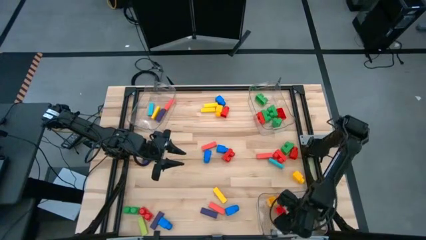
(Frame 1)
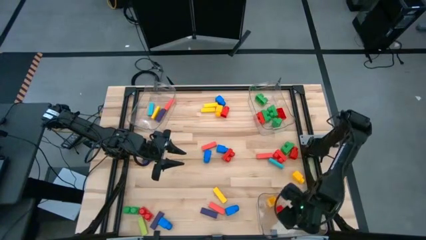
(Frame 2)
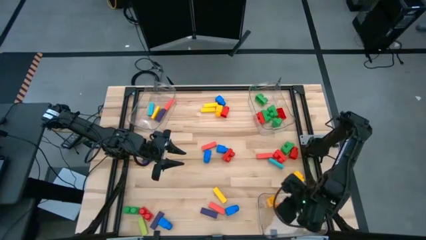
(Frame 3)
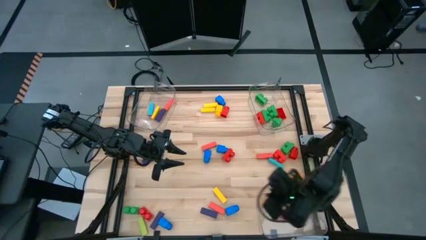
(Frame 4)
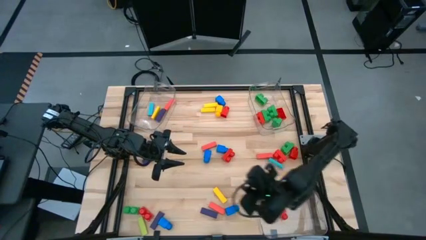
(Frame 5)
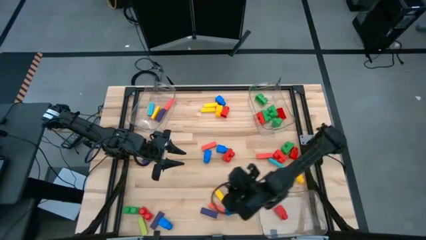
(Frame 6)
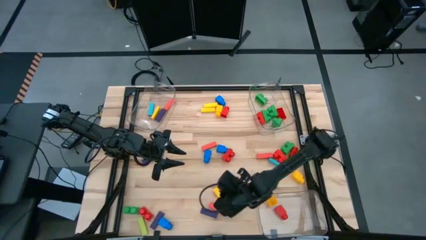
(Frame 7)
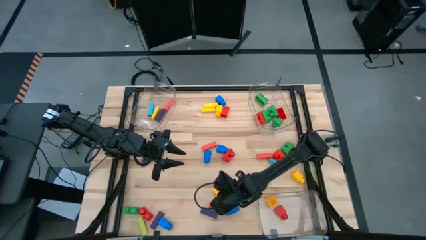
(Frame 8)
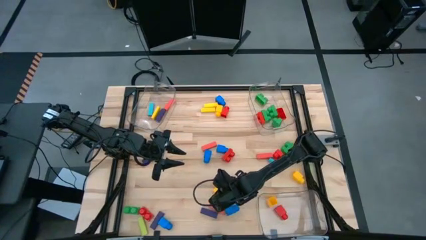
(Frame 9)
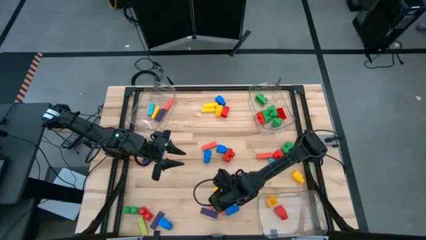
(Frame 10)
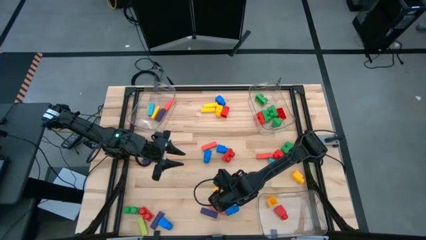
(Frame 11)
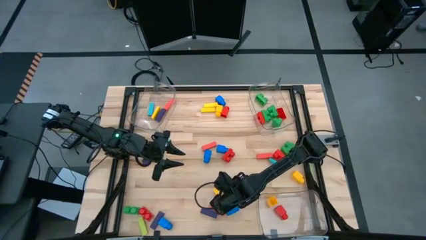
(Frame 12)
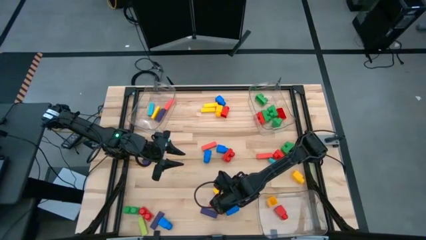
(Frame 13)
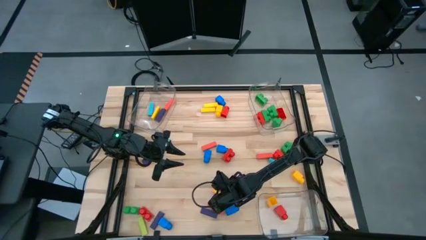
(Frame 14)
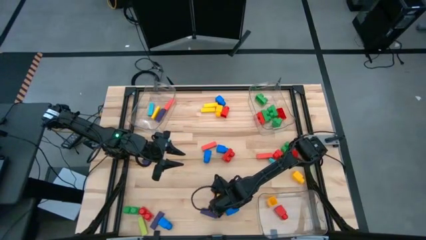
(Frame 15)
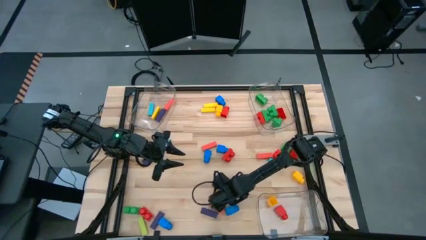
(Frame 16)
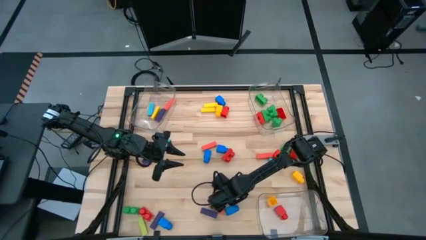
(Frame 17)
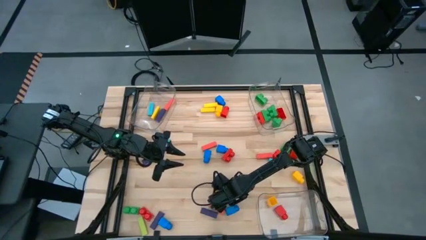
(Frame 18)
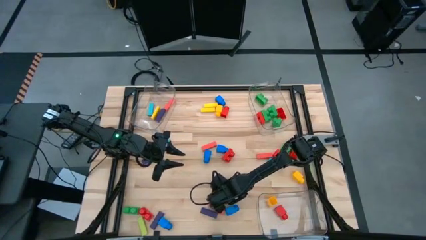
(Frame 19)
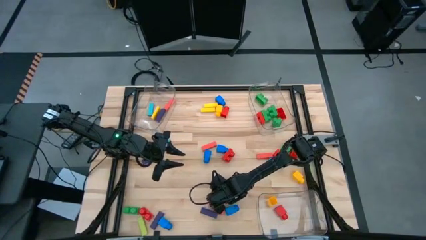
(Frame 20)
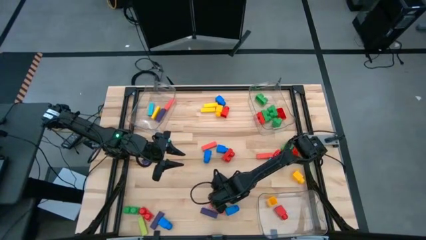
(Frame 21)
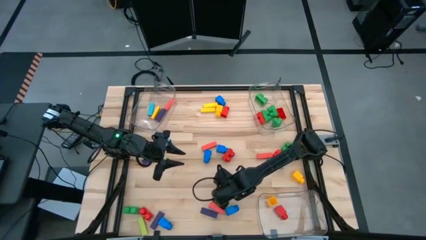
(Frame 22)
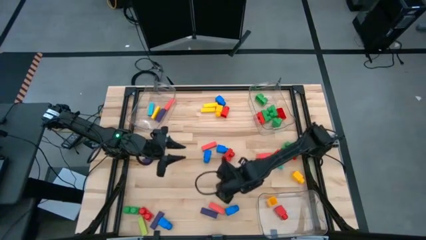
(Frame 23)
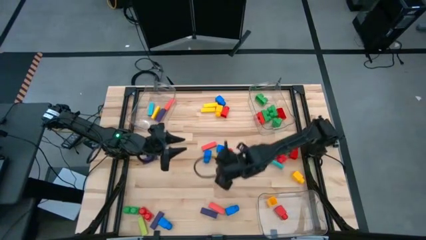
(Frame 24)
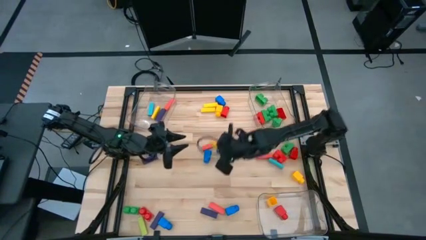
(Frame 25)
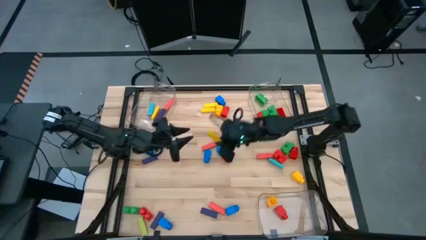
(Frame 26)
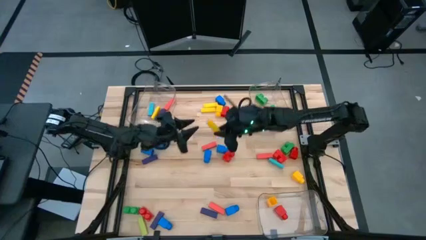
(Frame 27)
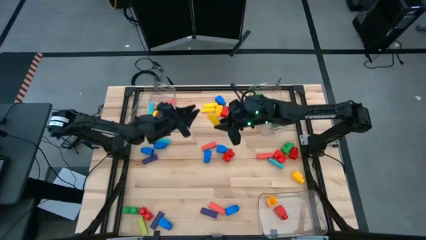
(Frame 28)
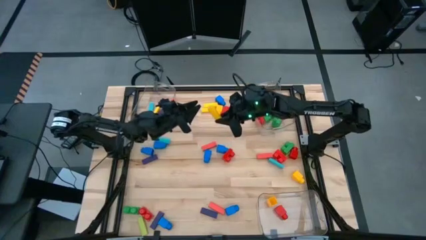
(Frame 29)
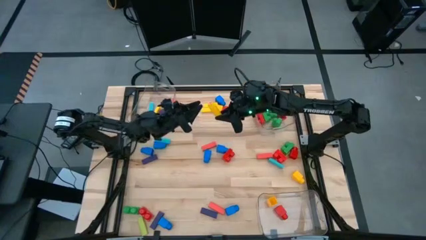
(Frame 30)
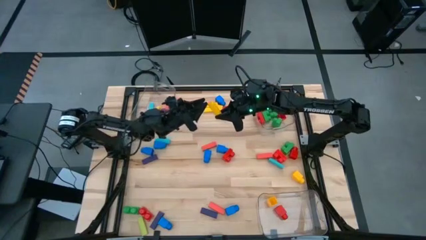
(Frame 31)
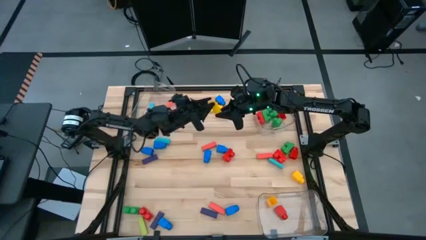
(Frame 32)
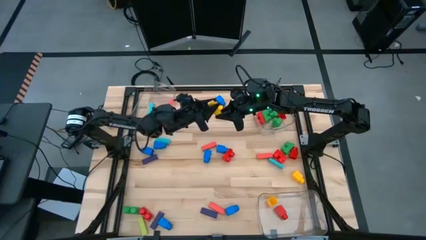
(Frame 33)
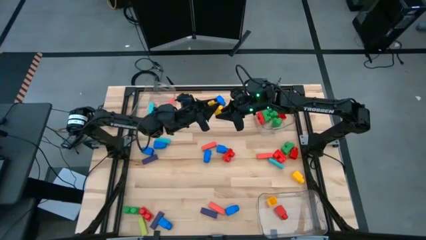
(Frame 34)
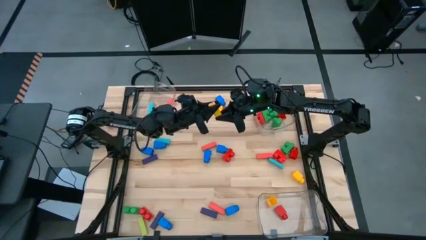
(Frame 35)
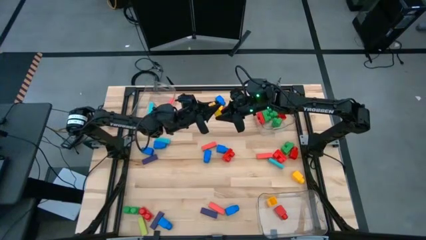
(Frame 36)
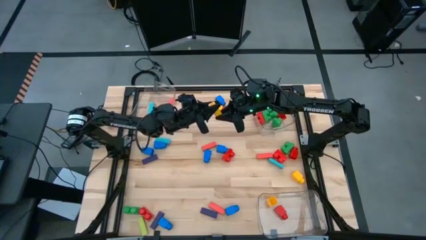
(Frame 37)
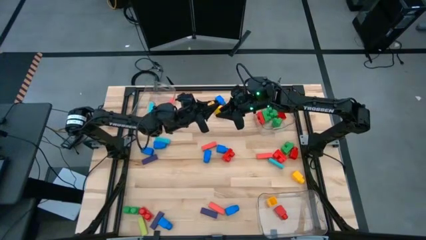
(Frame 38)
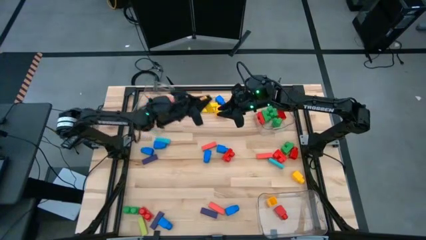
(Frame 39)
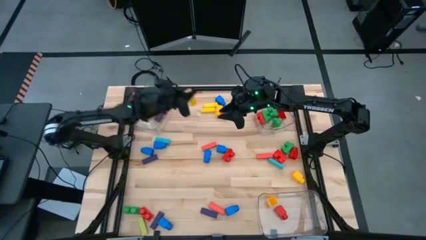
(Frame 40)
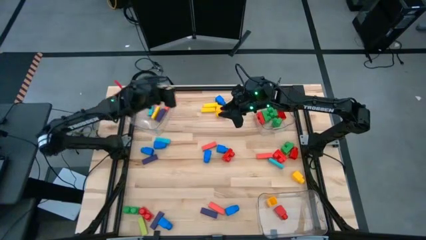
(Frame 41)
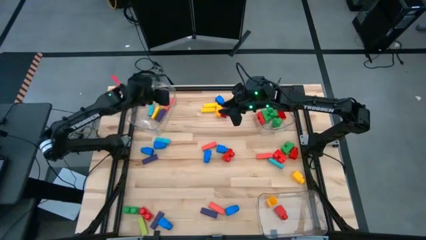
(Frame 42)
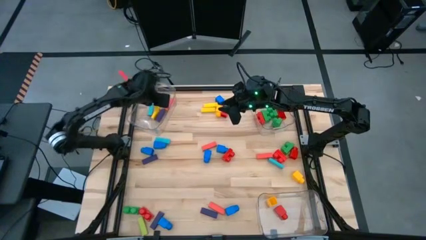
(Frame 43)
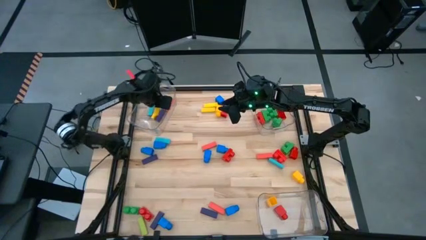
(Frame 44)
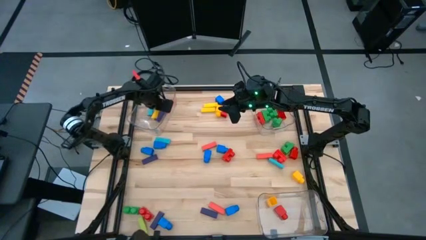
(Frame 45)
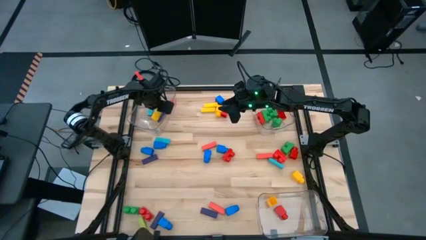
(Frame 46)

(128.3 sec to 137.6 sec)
Task: Sort blocks by size
Put the yellow block into the top left transparent bin

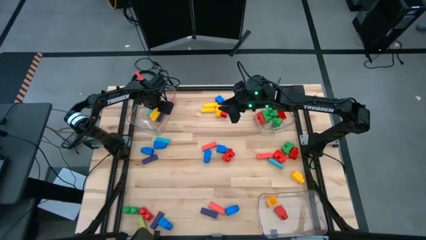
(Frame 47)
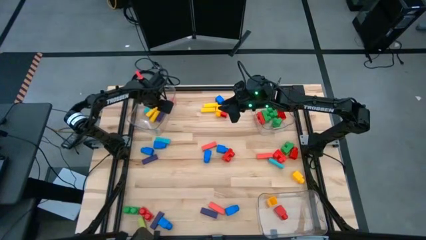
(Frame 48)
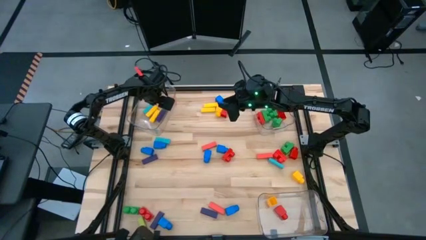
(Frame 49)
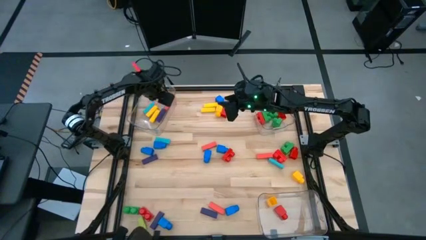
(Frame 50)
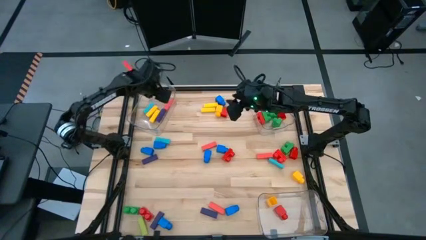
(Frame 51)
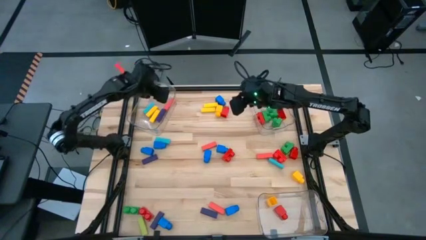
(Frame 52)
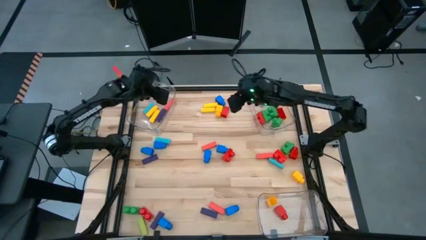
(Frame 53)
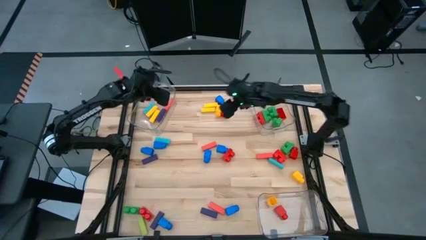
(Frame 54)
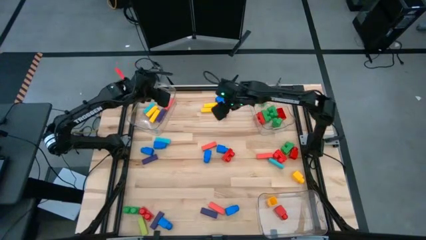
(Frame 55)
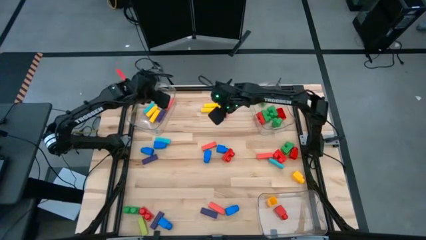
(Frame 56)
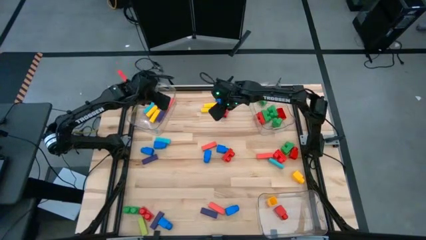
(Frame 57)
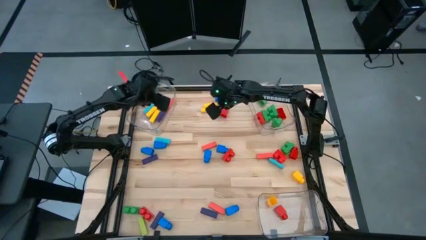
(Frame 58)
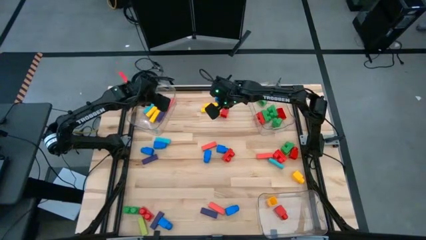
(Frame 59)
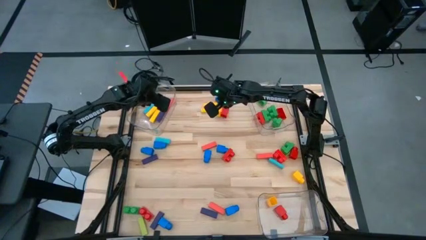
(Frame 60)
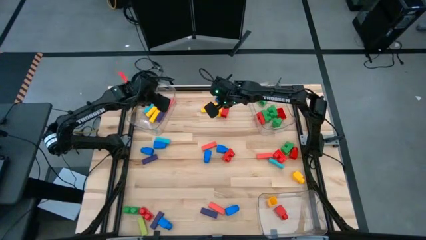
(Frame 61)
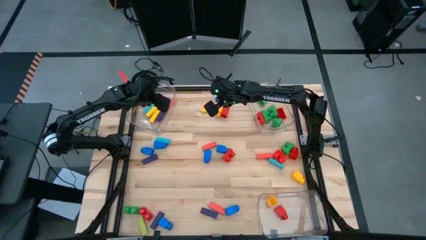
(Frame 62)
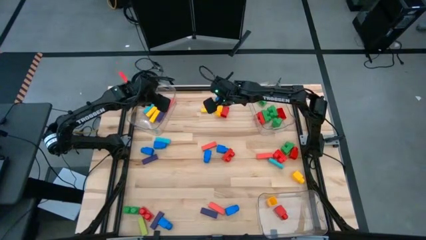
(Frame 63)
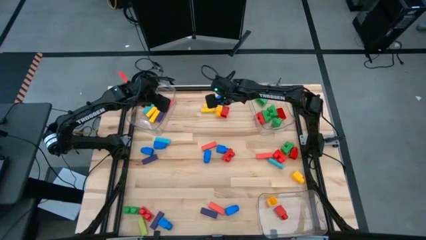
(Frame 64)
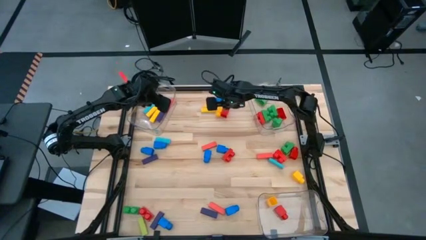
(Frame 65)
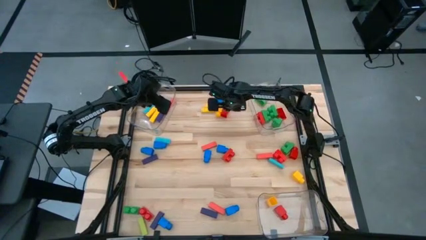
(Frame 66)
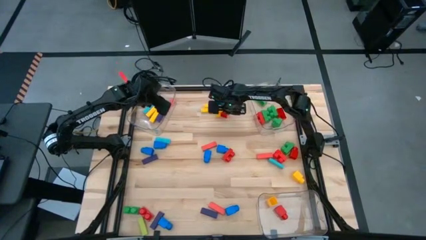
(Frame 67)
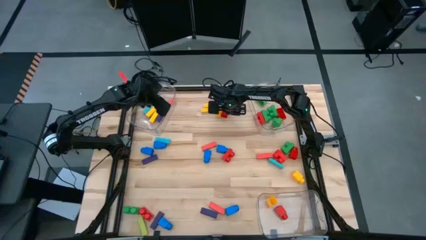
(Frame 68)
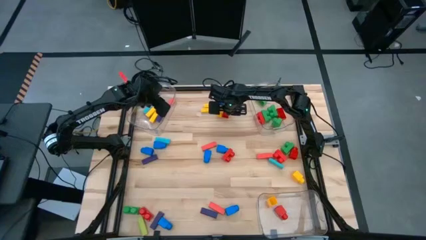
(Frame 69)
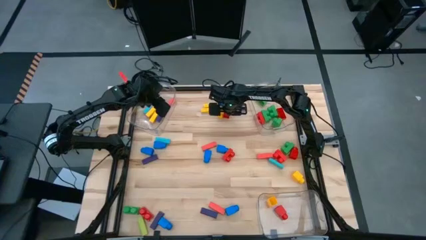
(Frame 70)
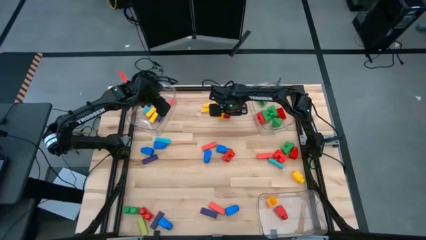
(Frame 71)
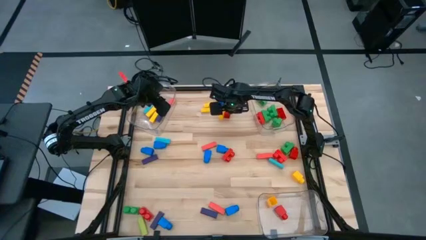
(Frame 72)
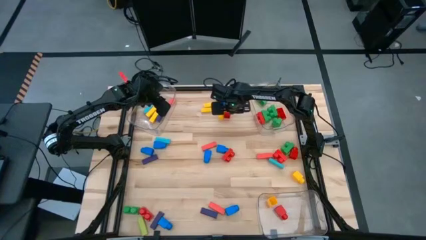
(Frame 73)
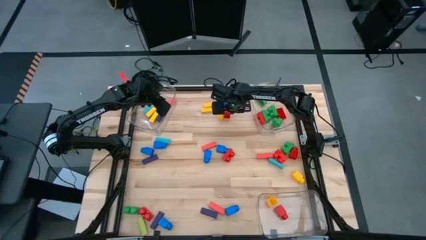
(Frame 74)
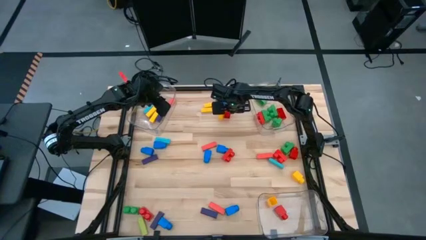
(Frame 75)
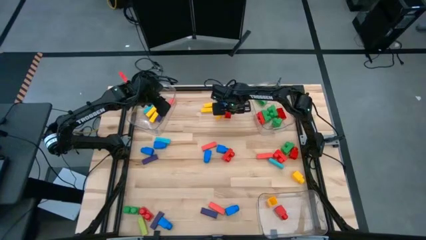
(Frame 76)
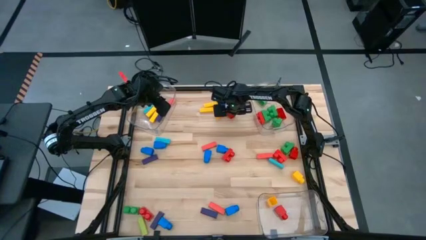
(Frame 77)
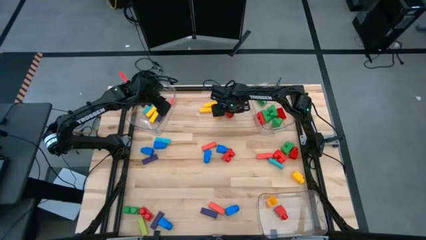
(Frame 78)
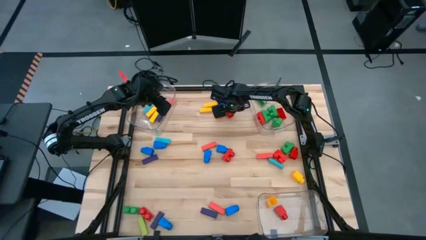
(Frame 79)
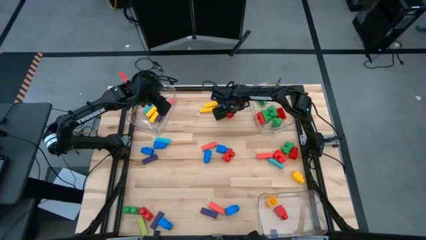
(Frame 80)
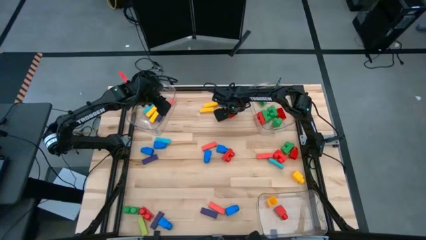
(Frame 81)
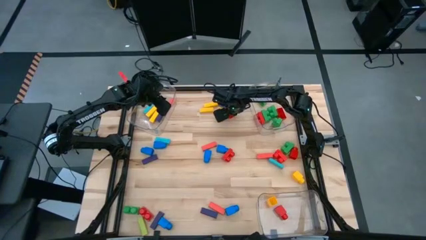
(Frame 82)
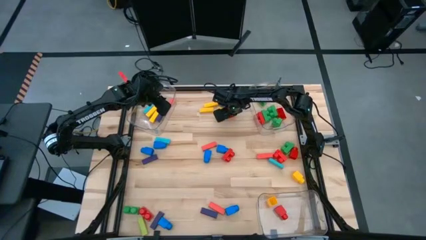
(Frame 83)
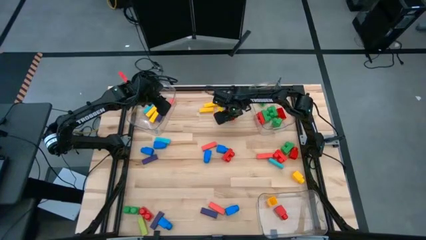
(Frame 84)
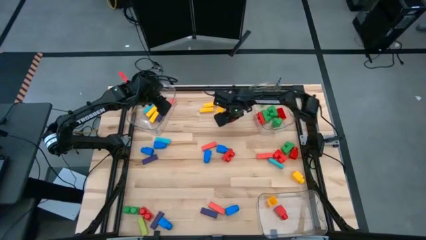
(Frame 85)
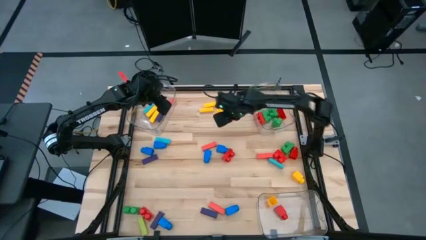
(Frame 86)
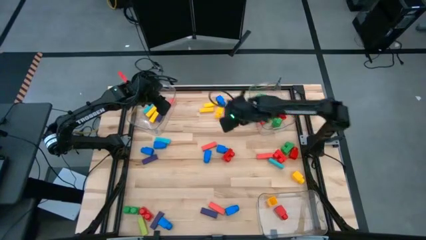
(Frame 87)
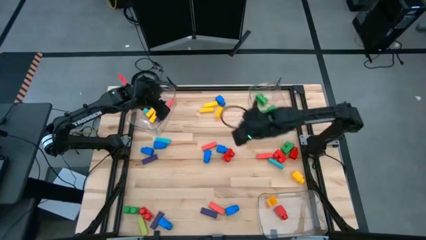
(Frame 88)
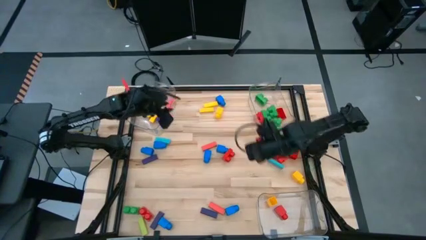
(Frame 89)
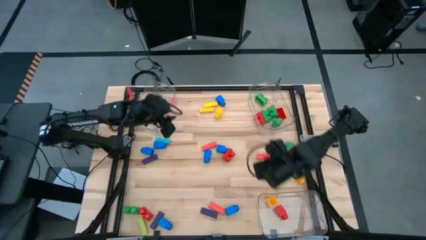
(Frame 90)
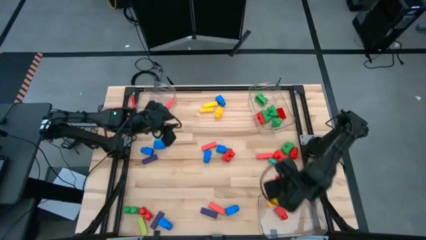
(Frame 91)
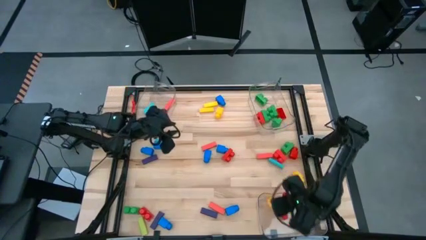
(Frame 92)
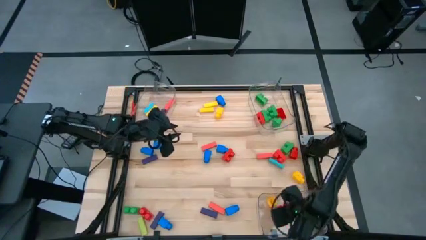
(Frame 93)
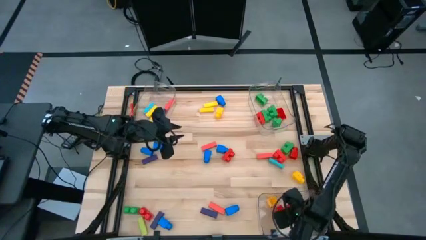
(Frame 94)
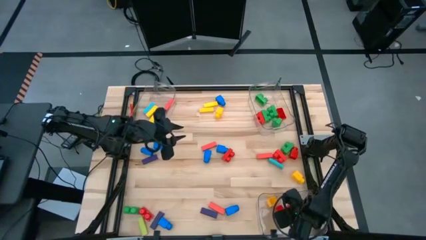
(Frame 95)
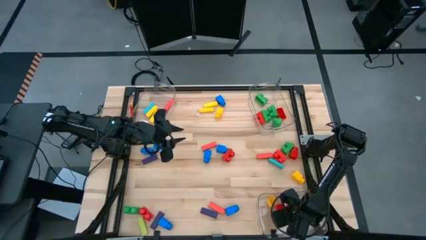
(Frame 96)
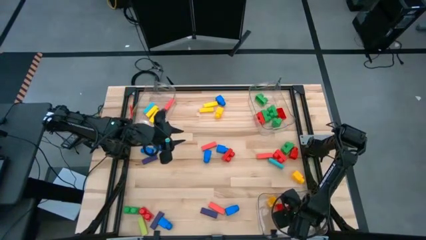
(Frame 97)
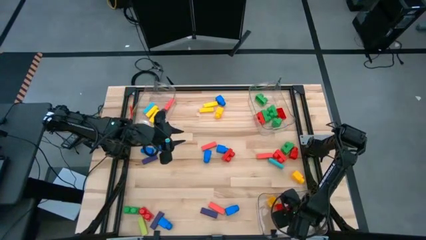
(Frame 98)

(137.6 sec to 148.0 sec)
Put the red 1 stud game piece into the bottom transparent bin
